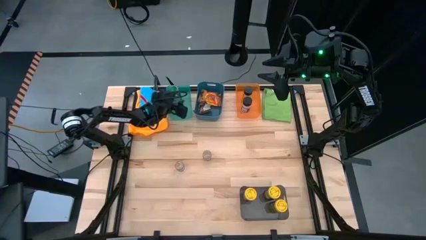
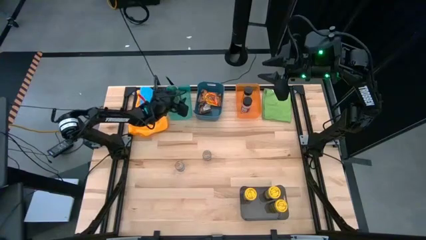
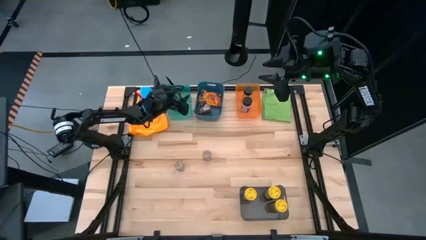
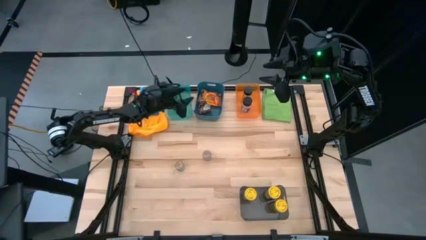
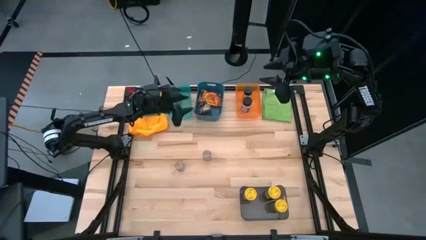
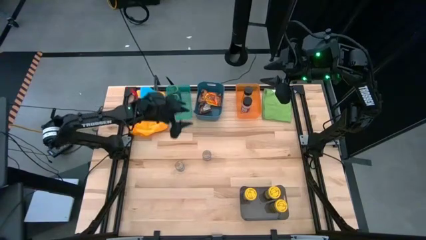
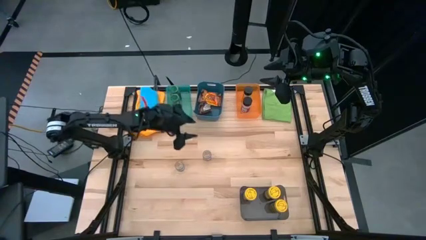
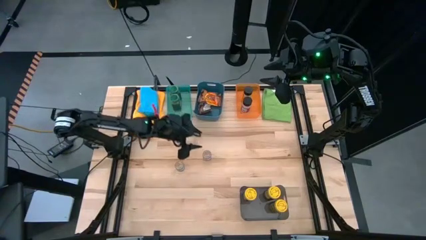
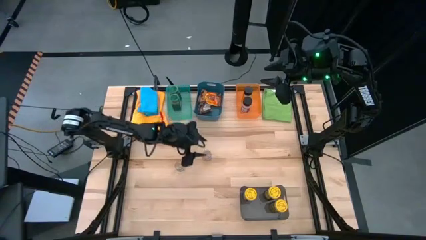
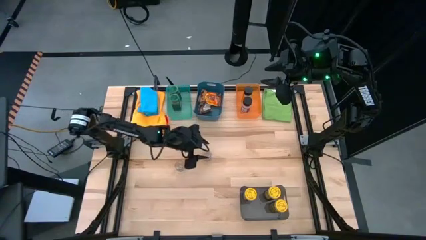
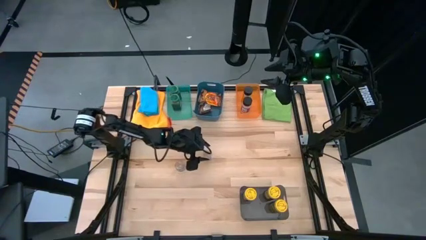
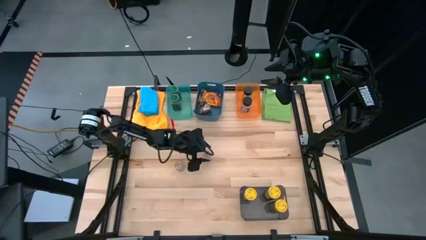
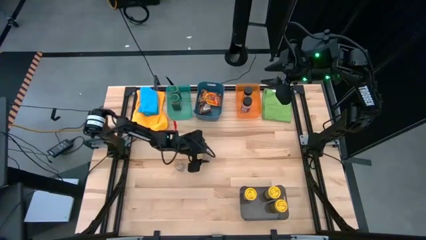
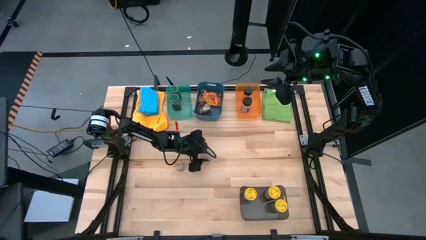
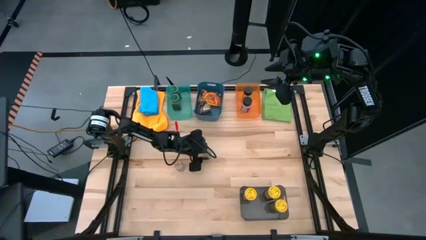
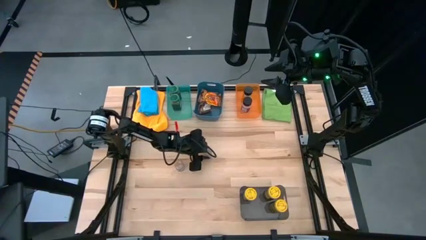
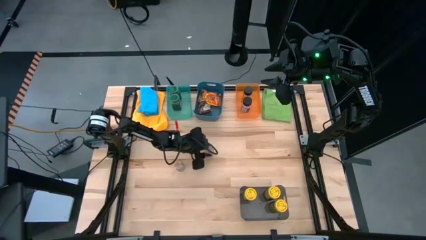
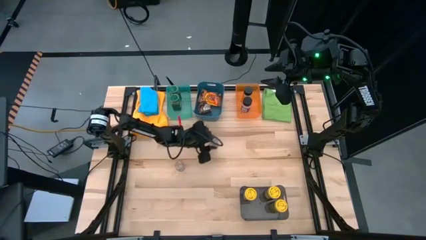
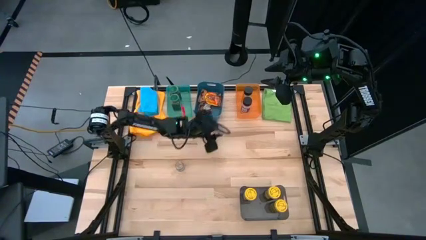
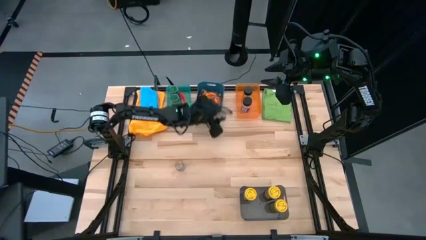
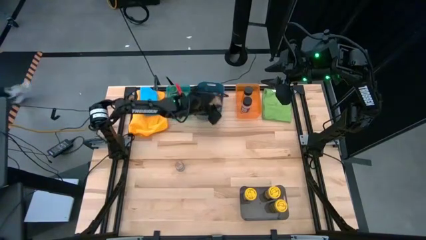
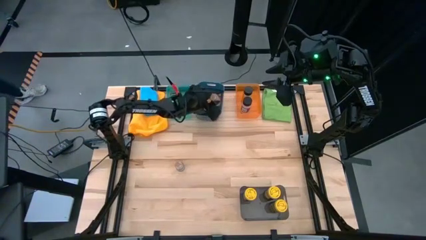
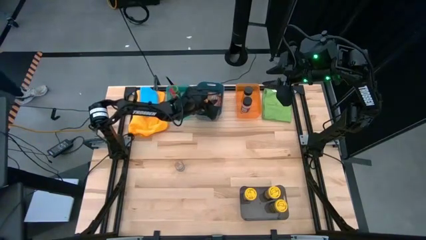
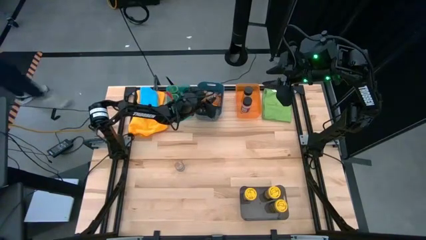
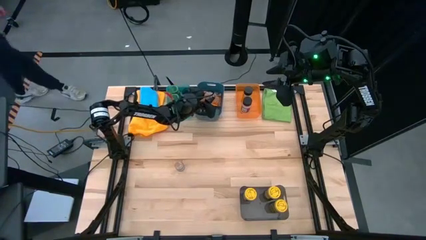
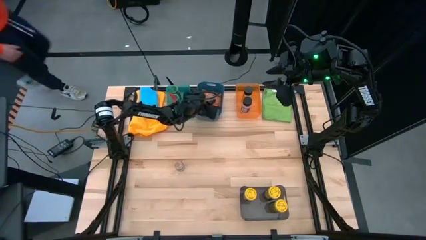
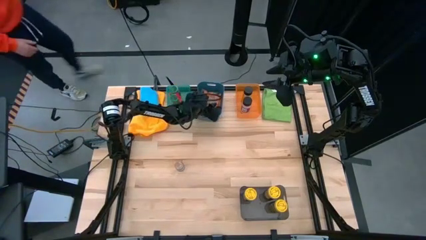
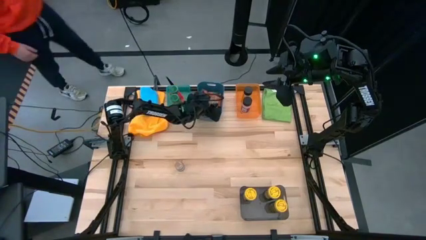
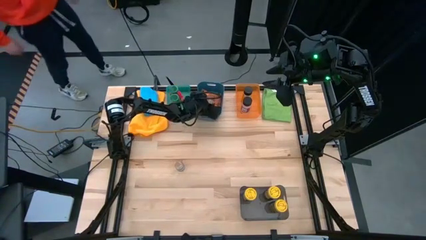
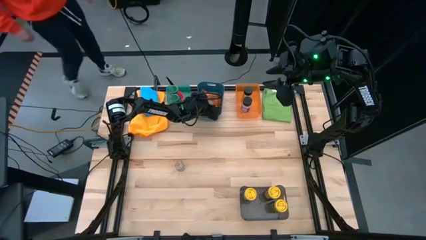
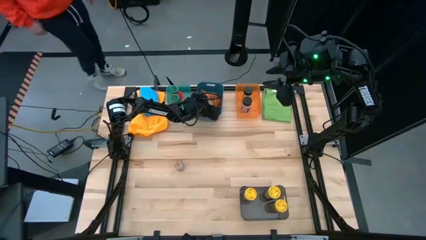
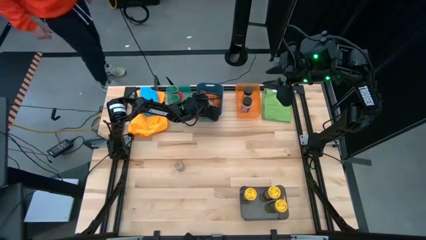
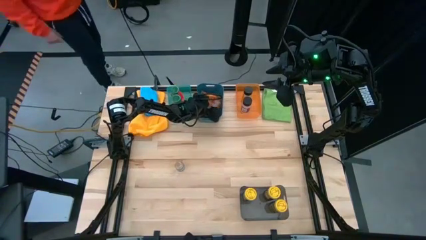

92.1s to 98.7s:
Task: Sort spices by type
Put the right brown seasoning bottle into the blue bin

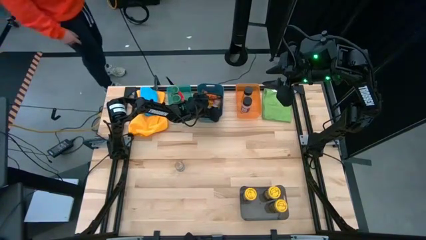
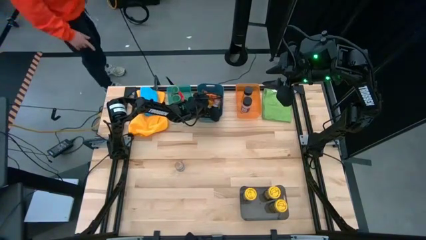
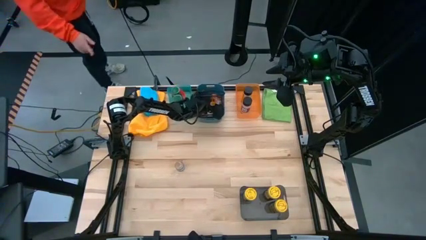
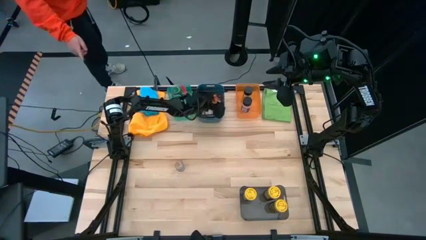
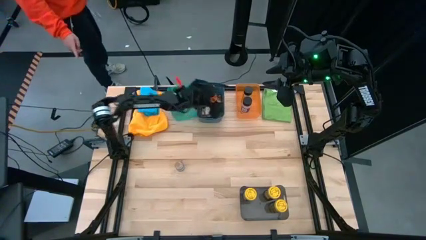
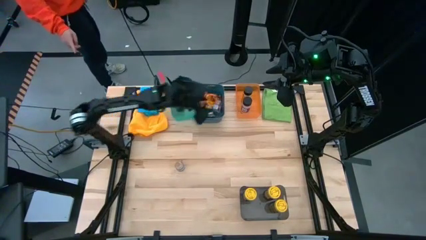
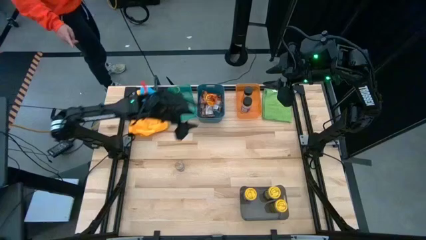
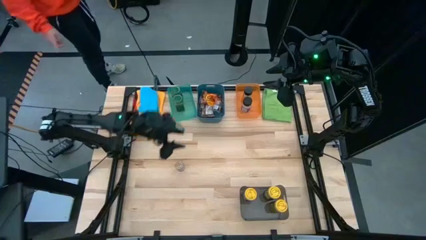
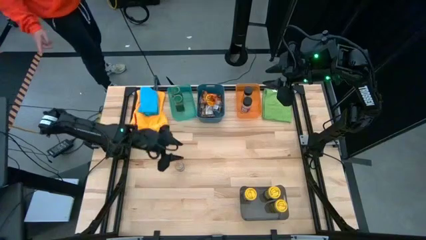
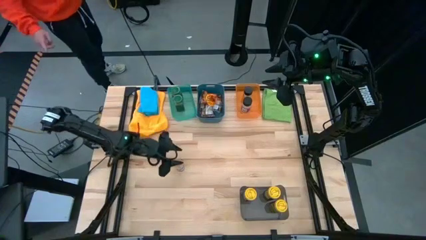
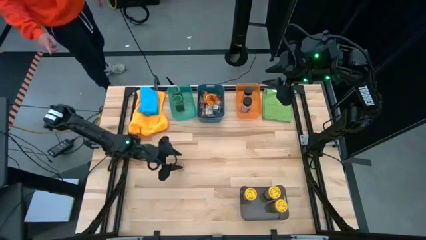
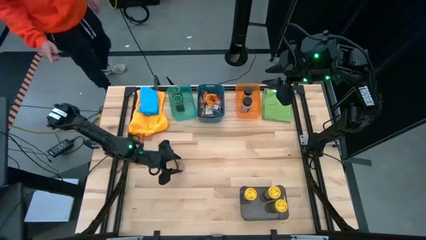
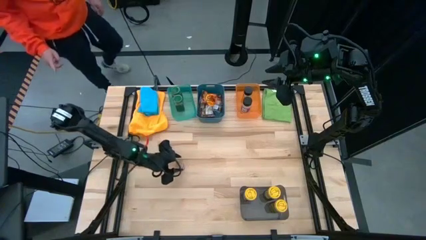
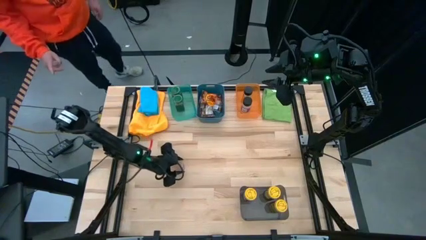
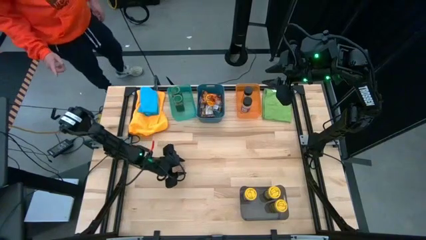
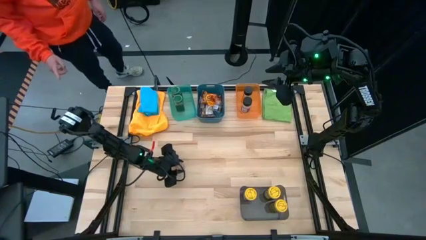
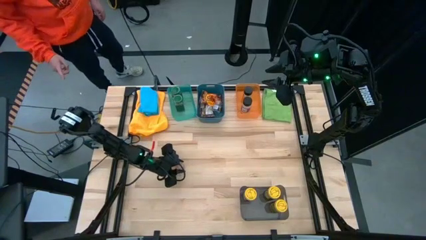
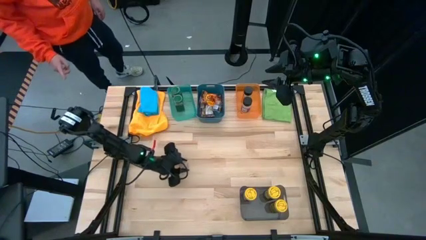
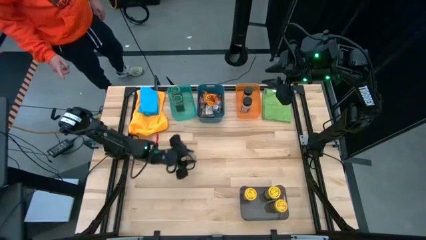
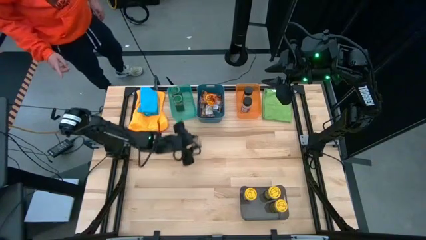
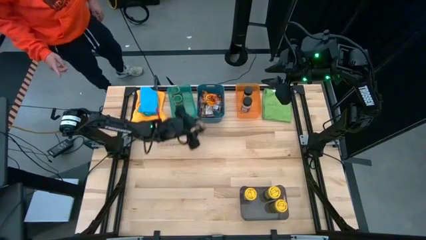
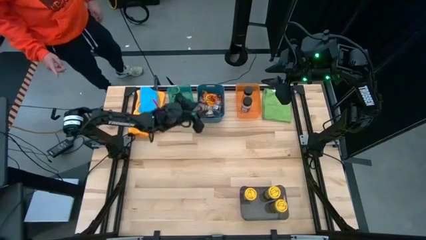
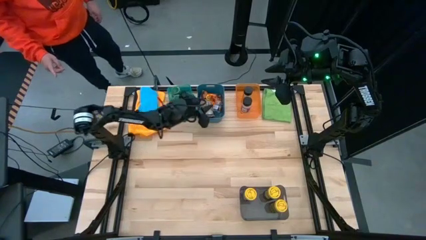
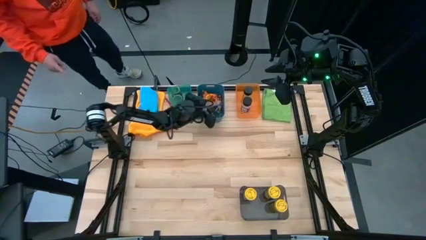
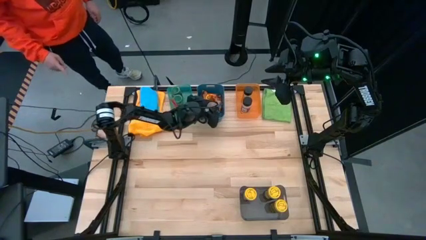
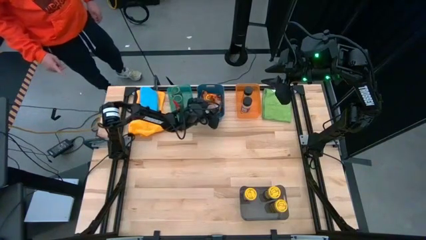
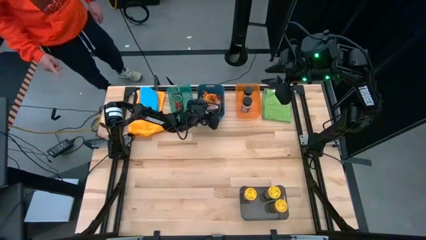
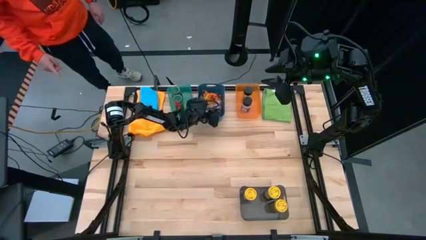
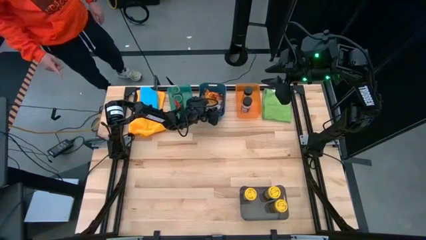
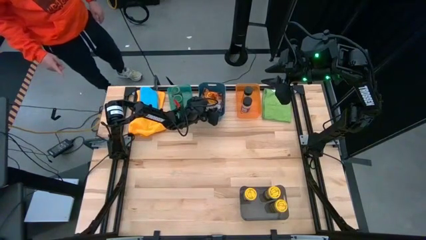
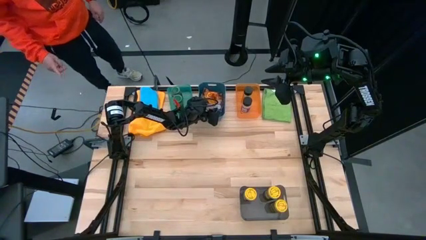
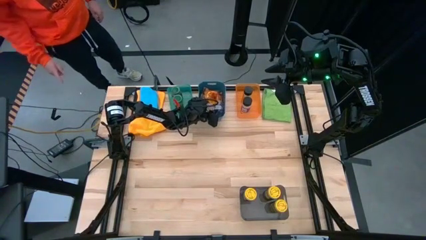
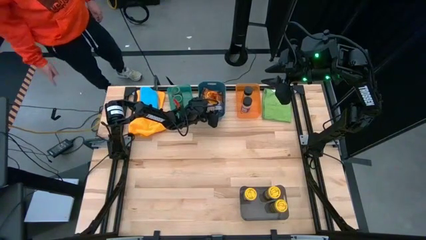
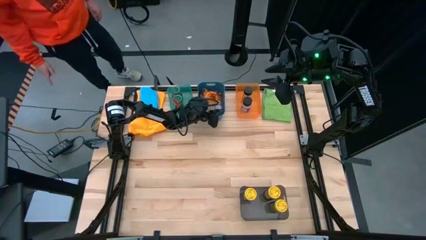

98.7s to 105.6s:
Put the brown seasoning bottle into the blue bin

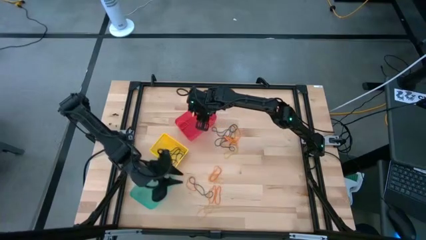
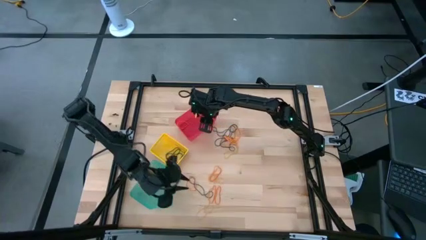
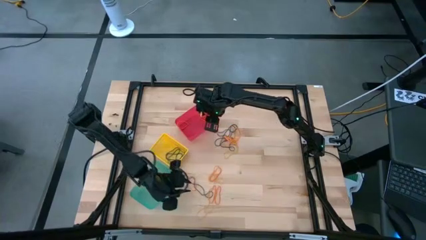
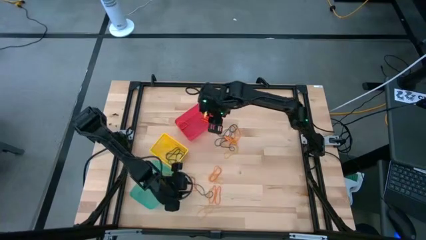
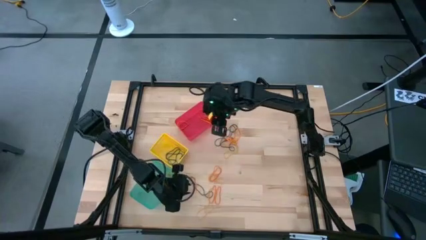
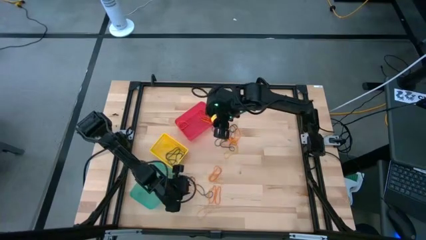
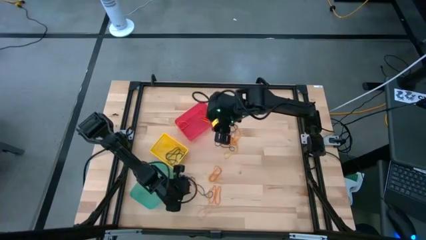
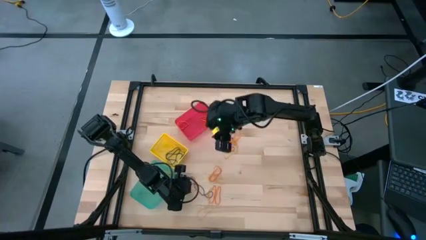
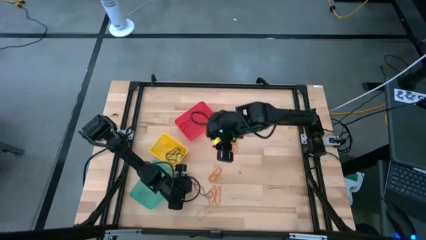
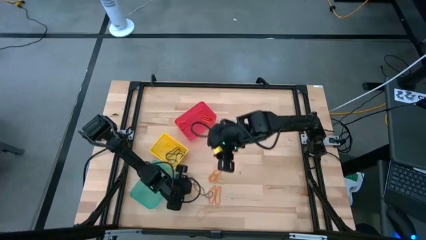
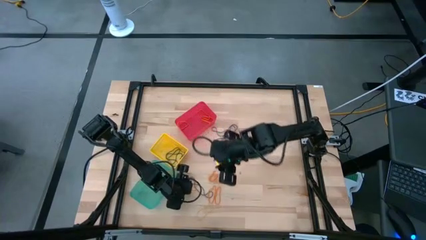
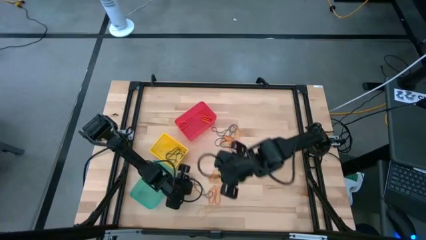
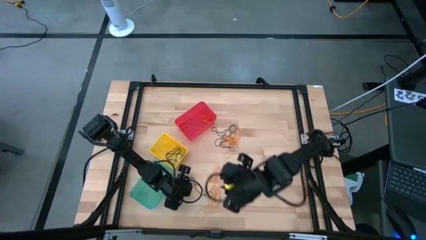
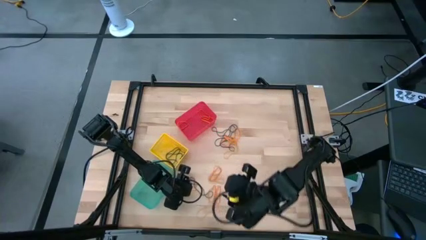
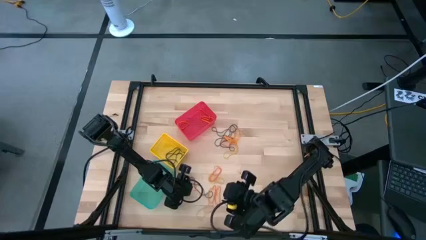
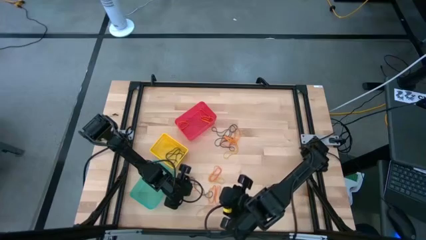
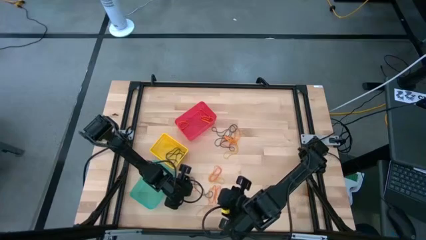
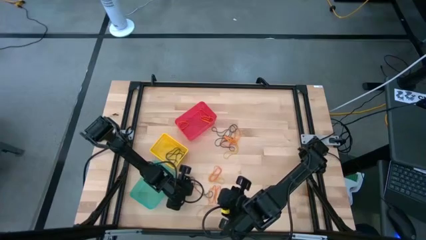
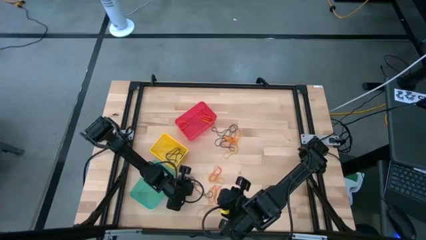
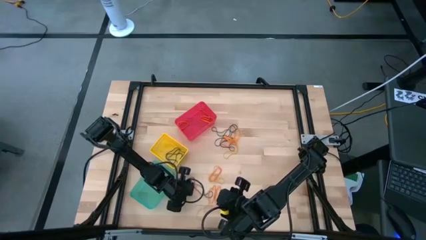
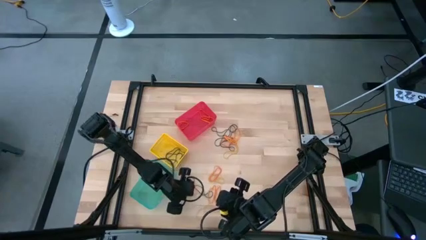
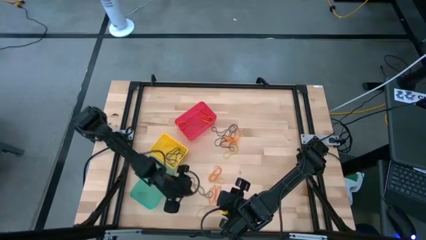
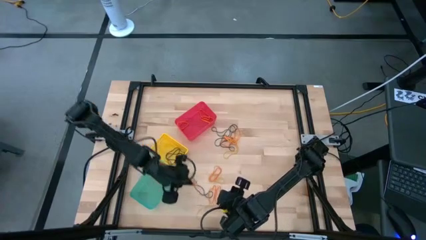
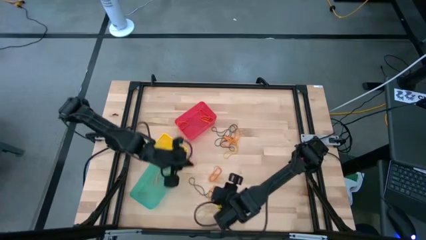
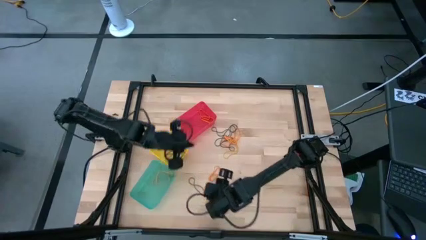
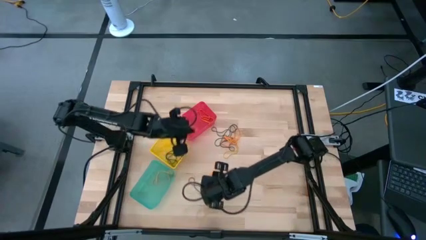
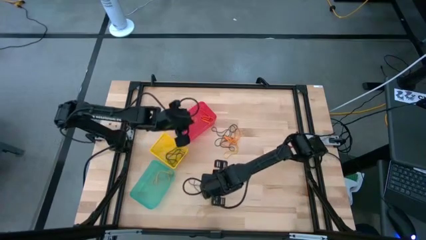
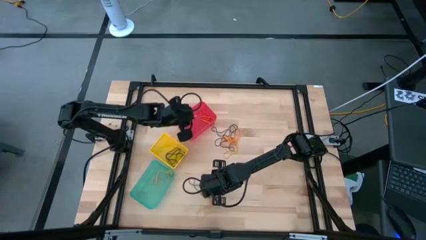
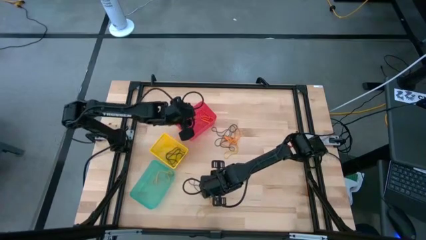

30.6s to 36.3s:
Task: Sort rubber bands into baskets
Put the orange rubber band into the red bin
